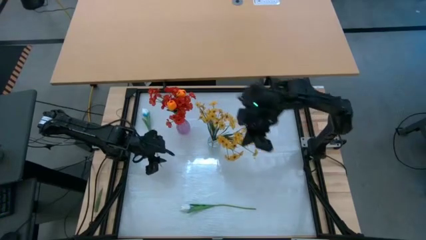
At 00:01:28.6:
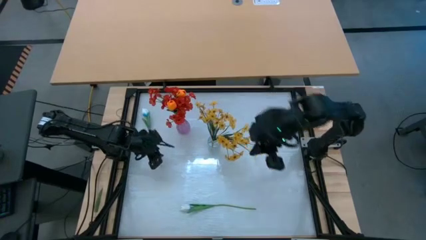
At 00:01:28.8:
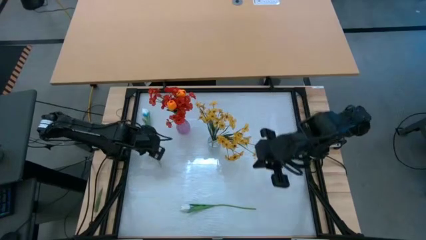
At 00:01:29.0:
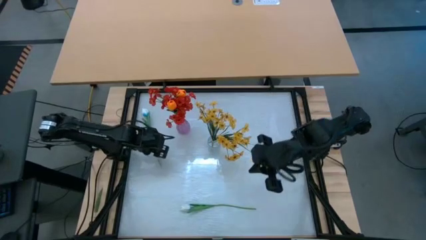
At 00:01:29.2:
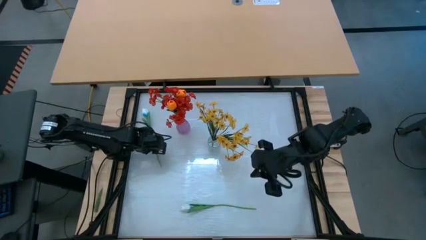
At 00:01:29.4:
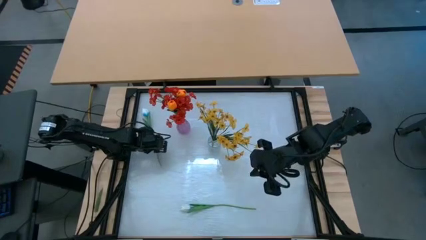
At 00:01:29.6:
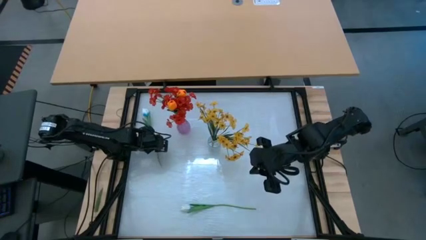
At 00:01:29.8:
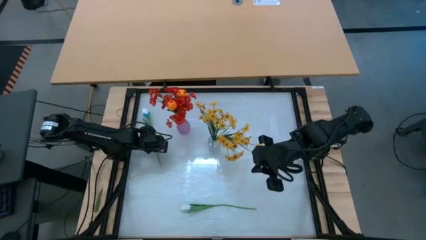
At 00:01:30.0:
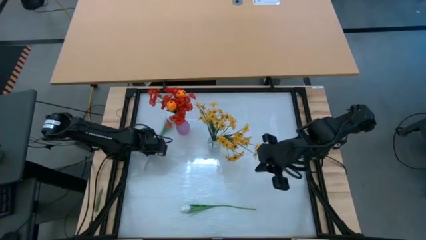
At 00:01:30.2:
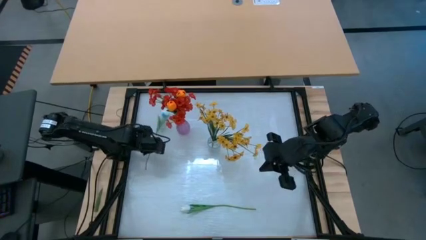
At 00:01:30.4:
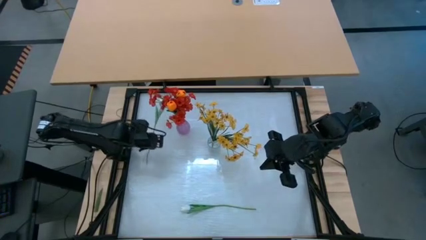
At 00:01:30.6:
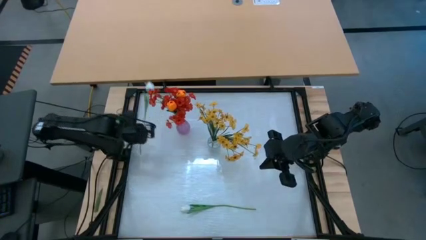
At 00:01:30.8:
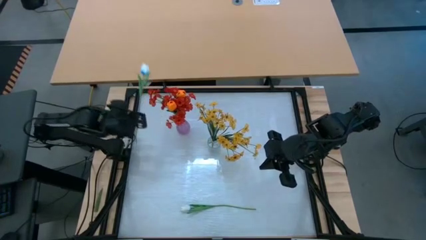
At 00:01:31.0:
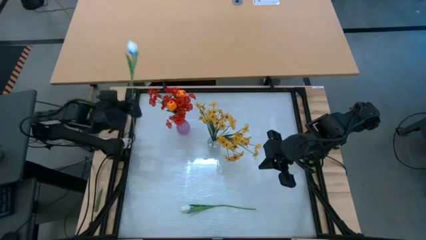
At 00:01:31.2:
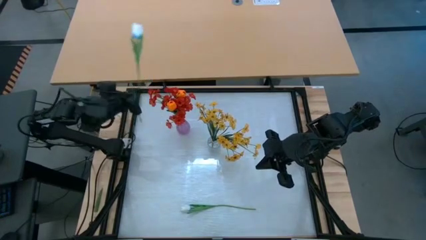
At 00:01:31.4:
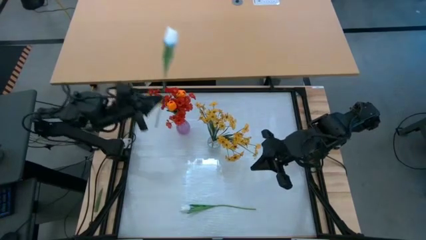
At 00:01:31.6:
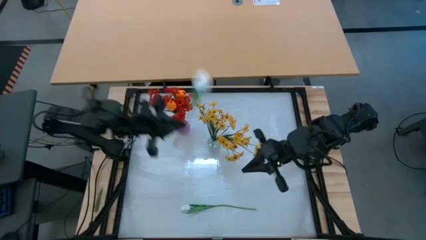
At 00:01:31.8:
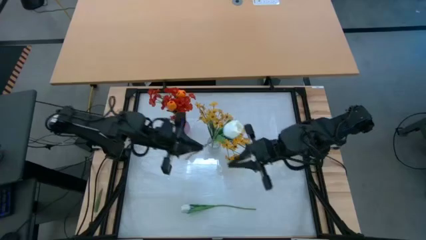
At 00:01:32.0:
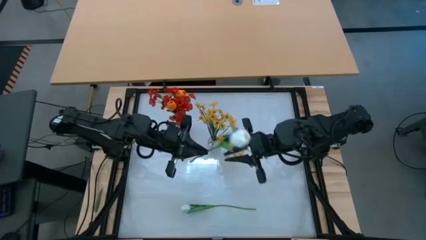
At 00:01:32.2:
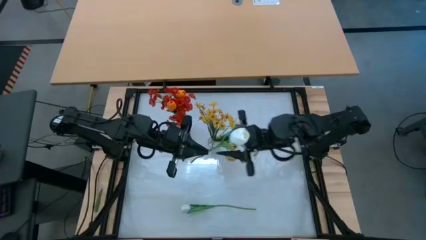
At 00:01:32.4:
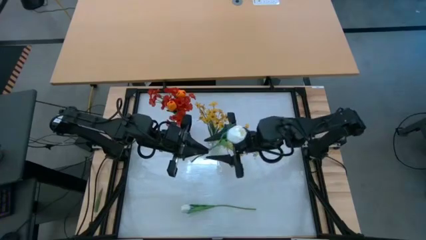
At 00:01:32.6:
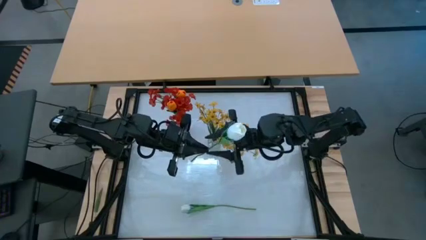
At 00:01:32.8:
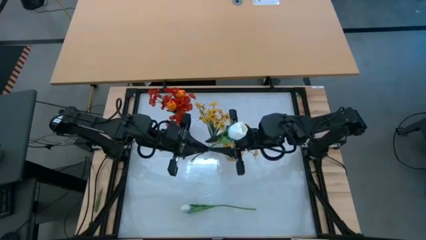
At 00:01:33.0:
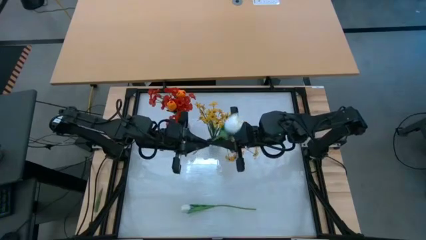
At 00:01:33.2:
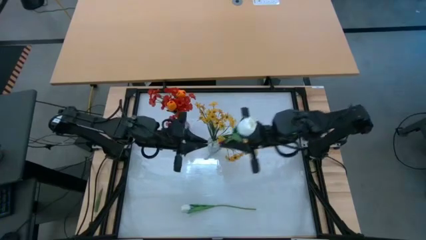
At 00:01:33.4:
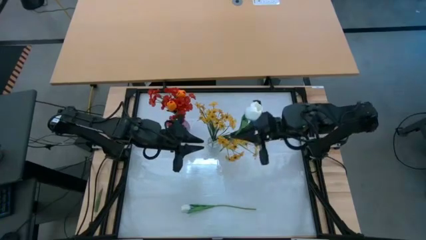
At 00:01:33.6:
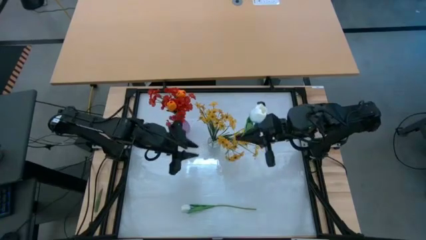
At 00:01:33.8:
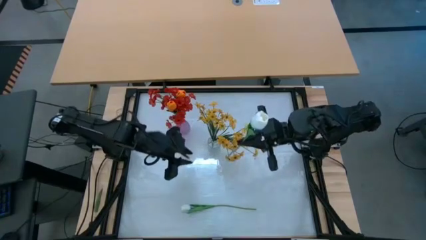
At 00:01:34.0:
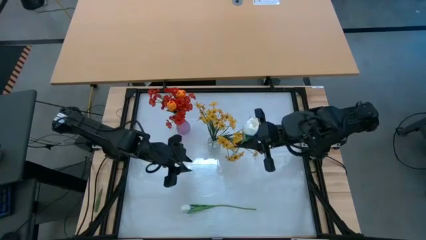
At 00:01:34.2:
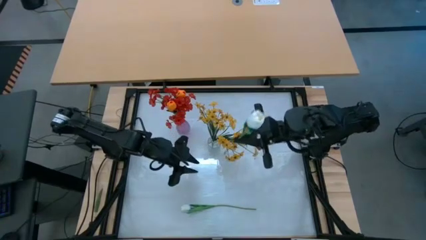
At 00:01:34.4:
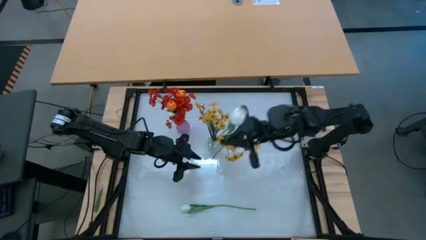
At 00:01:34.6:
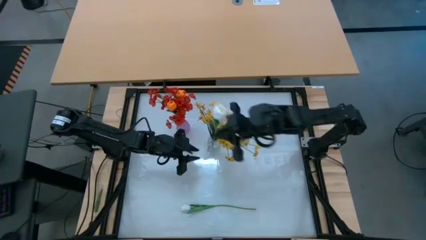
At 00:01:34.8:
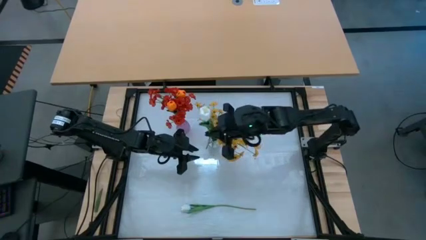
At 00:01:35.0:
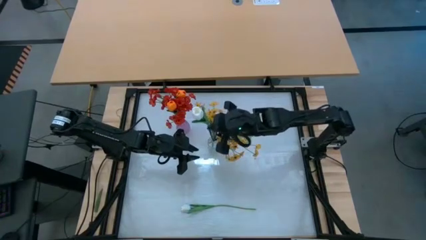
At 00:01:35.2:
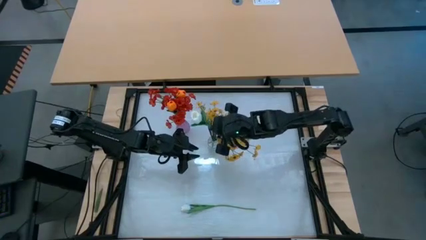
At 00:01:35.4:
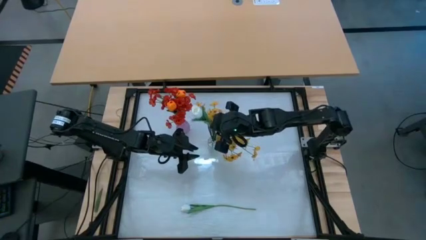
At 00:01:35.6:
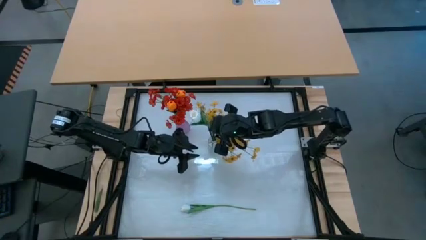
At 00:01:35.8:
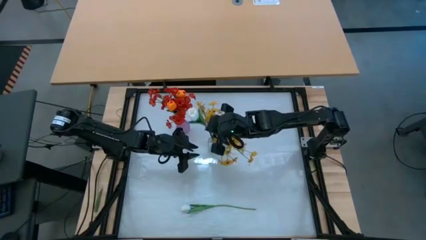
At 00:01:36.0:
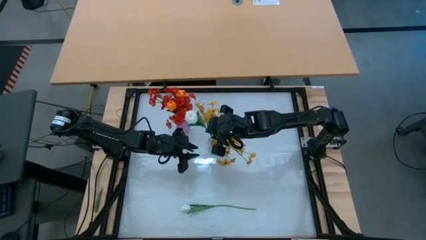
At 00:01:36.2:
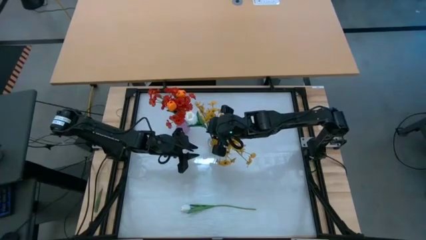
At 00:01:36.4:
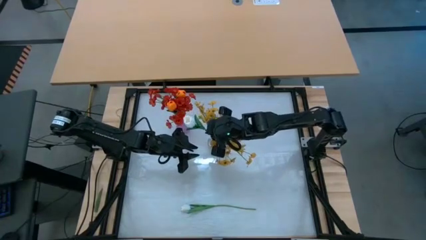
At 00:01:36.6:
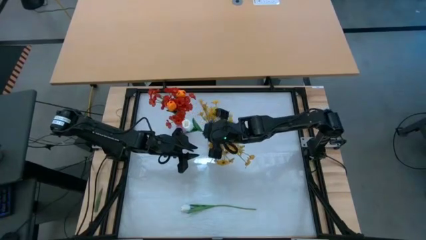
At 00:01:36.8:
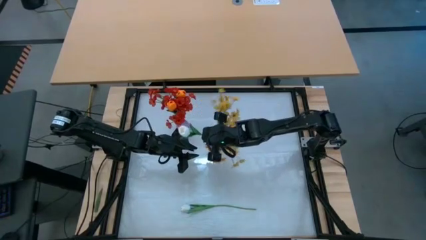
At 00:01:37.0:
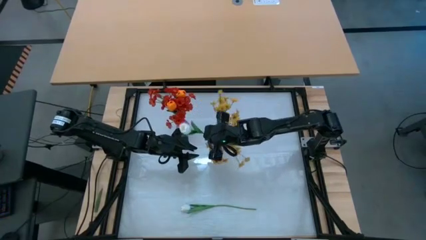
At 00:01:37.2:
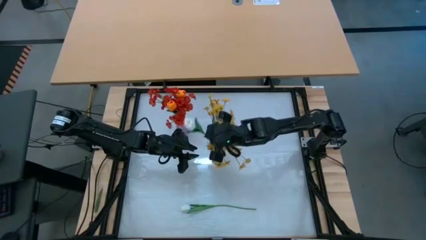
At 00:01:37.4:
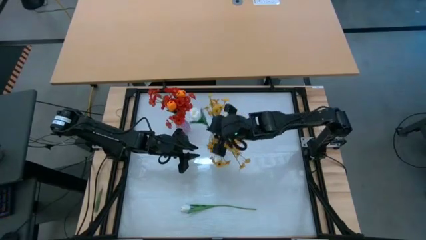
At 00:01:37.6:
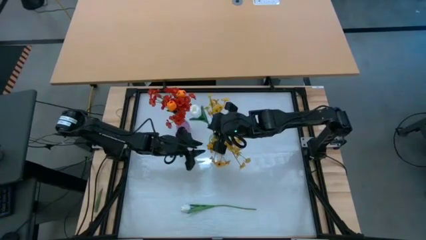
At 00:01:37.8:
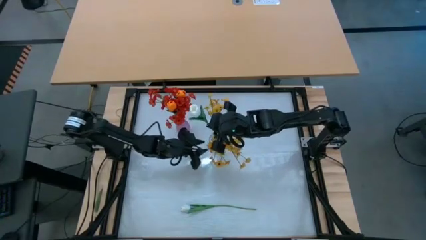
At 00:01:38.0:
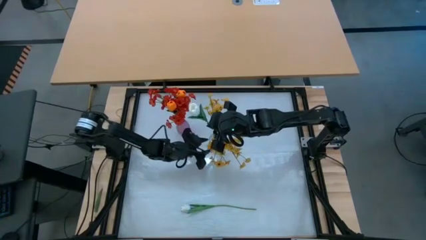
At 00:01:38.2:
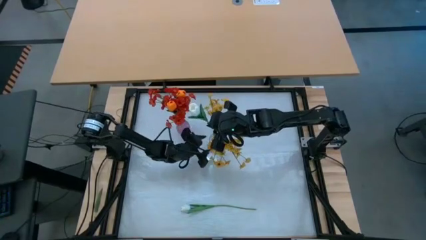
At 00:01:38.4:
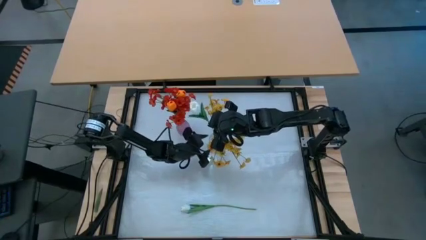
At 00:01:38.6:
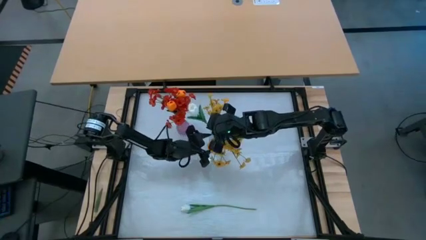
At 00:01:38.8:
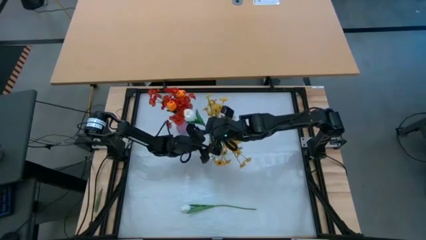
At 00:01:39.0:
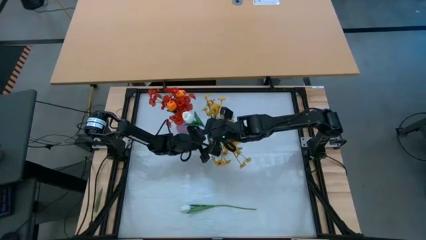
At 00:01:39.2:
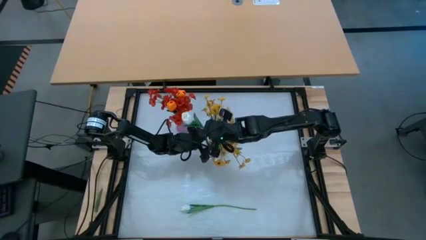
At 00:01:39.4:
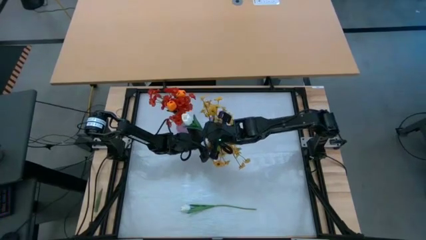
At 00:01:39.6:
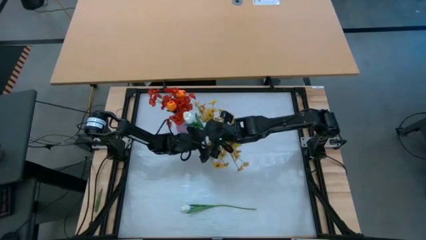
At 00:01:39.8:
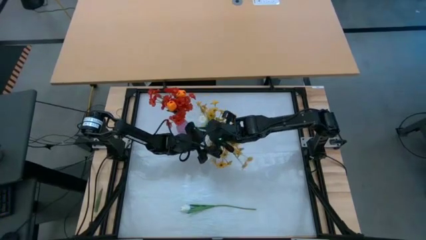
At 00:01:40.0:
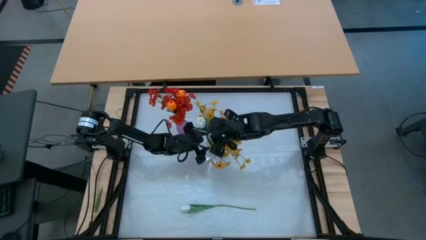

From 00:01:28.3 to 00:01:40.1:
Task: Sort flowers into vase by color
Put the top white tulip into the transparent vase
